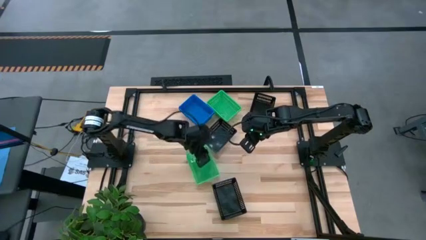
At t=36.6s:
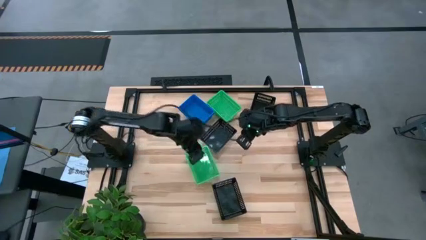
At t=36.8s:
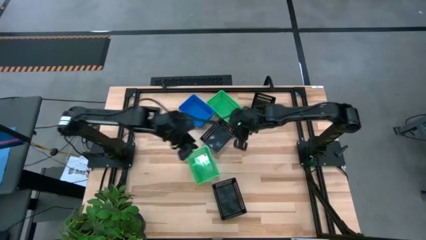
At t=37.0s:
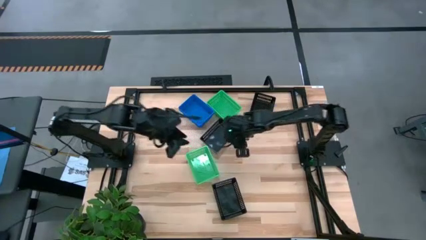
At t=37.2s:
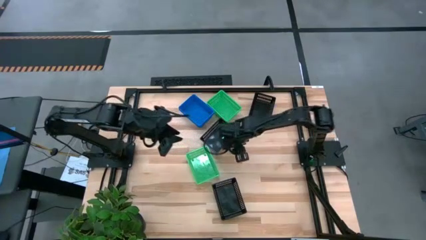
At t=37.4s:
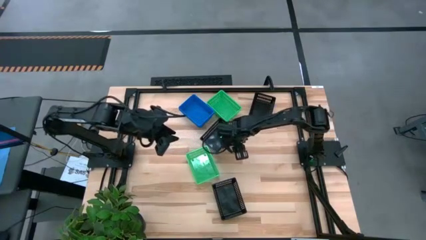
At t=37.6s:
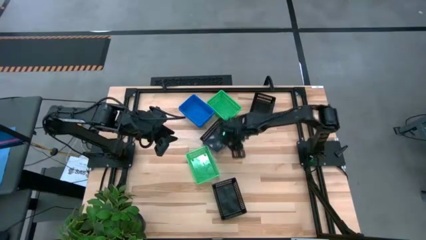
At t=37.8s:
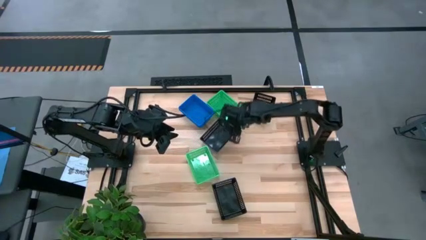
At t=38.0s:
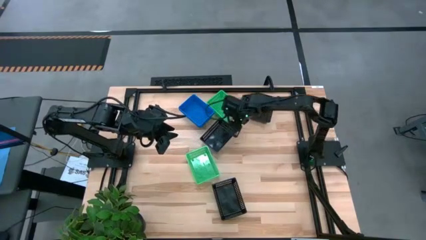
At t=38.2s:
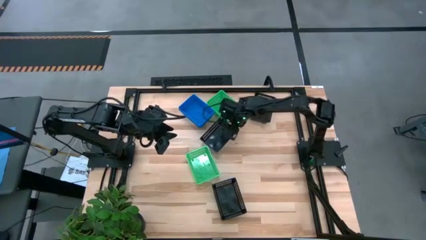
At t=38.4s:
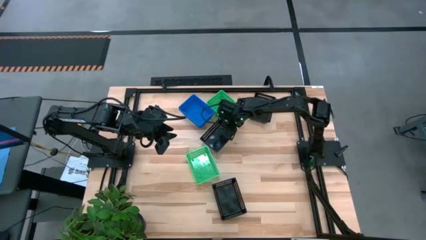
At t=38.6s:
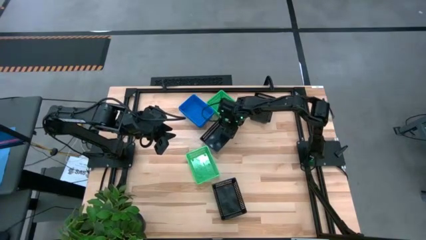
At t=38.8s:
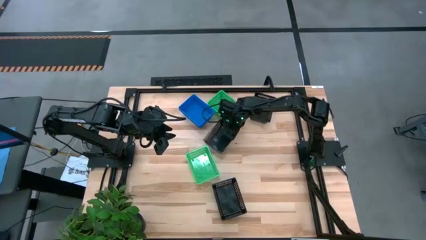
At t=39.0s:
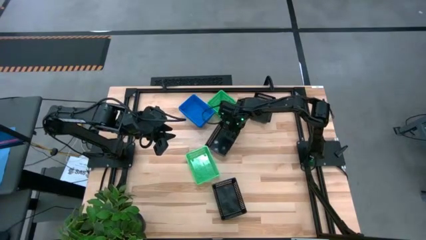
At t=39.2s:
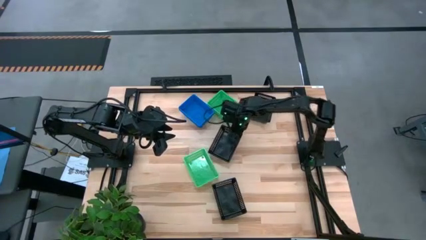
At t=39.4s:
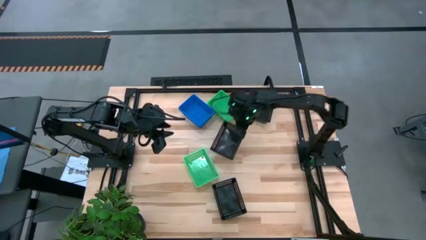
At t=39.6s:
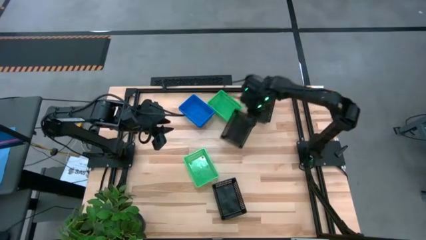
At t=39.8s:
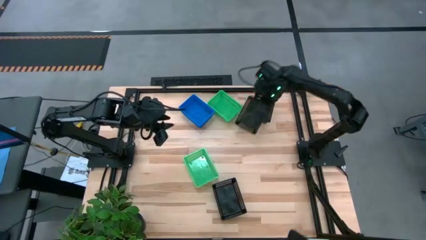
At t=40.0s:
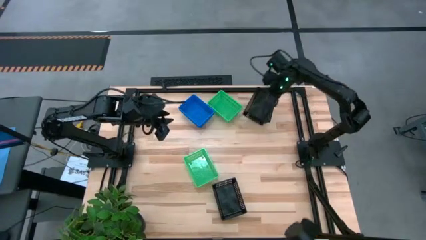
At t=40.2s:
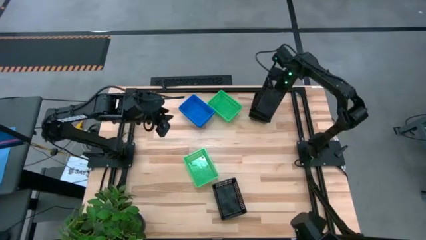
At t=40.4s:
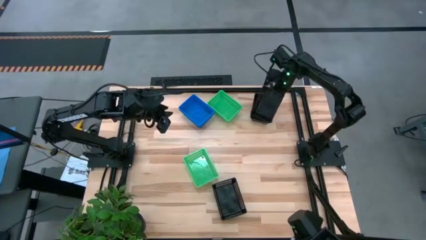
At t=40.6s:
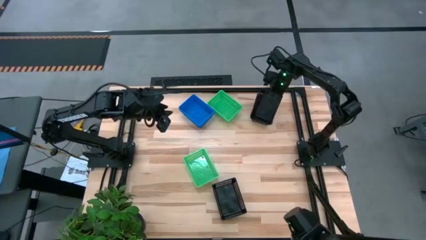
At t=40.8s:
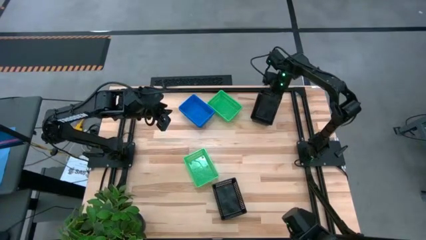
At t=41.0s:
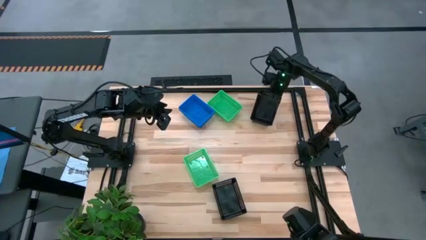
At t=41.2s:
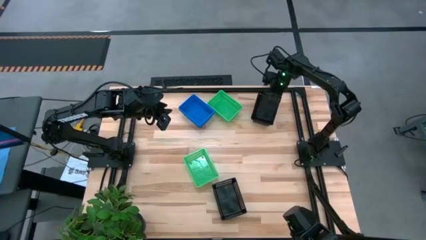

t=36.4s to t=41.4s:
Stack the top black bin on the black bin

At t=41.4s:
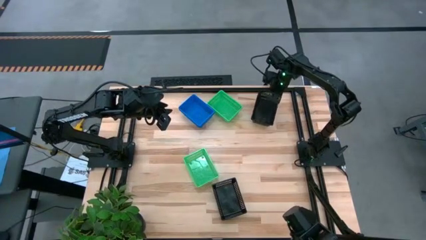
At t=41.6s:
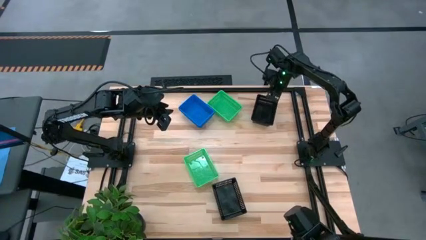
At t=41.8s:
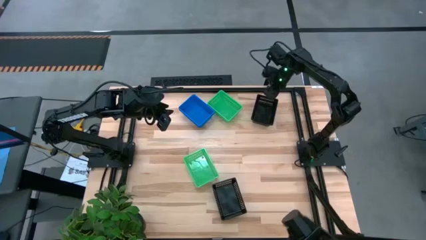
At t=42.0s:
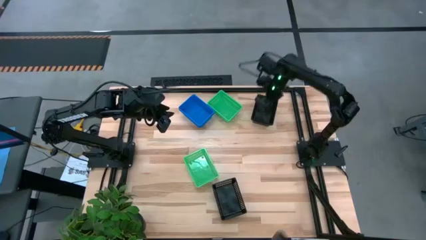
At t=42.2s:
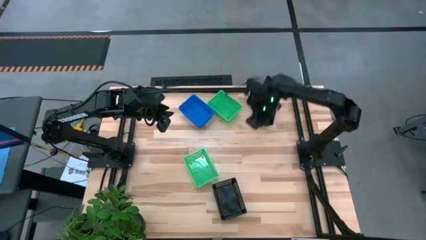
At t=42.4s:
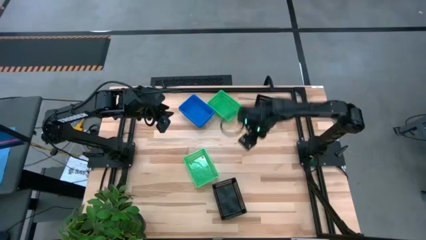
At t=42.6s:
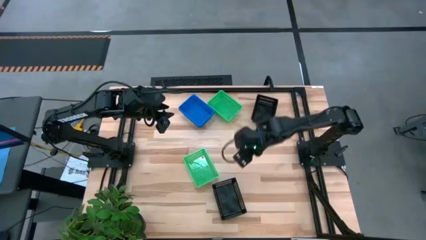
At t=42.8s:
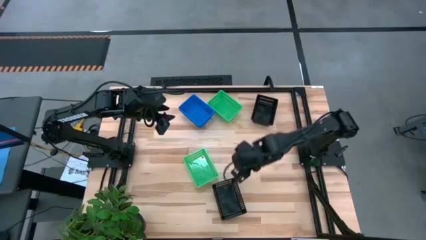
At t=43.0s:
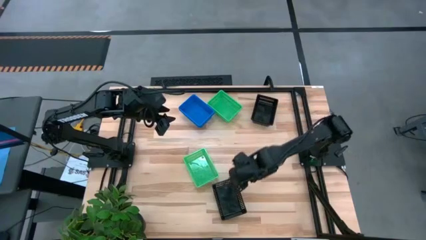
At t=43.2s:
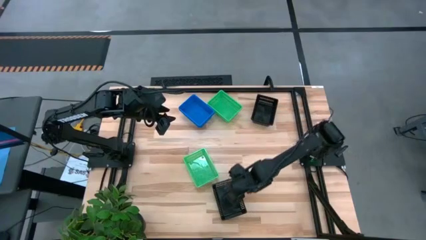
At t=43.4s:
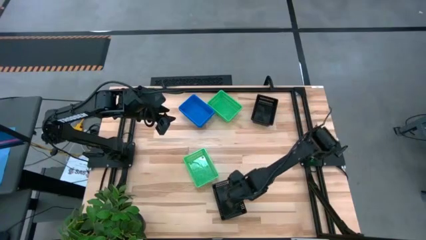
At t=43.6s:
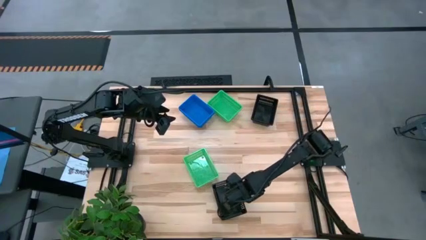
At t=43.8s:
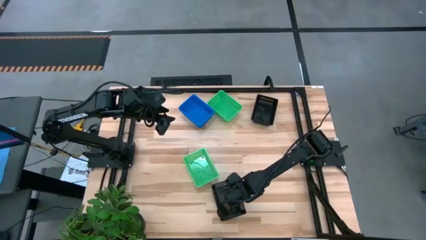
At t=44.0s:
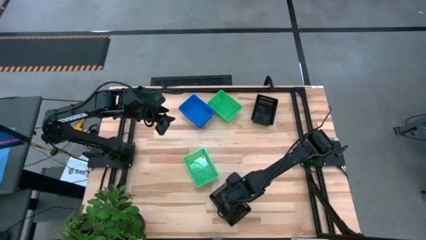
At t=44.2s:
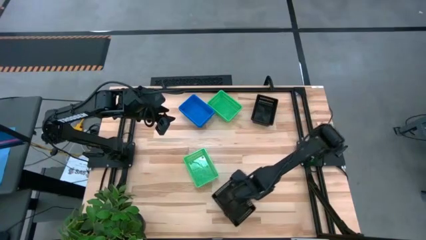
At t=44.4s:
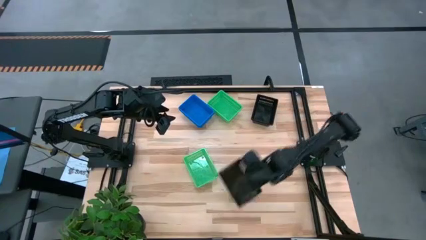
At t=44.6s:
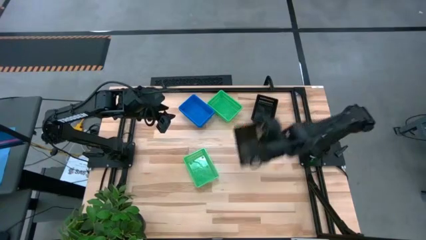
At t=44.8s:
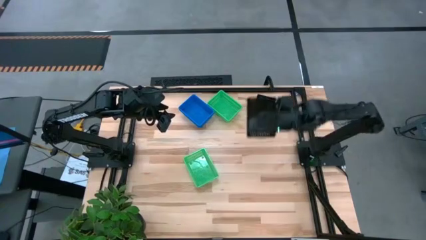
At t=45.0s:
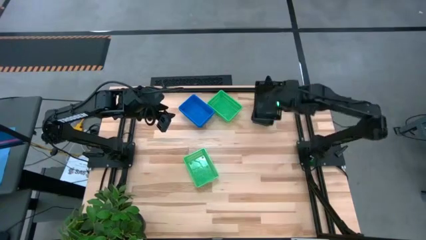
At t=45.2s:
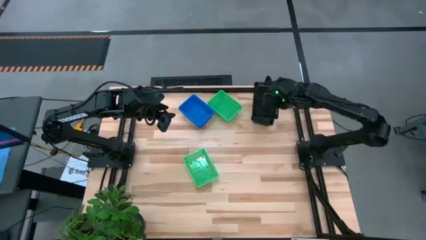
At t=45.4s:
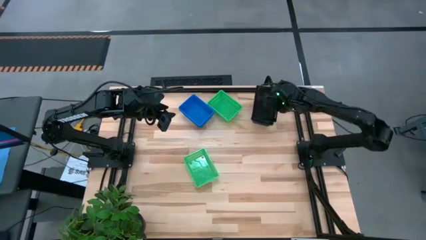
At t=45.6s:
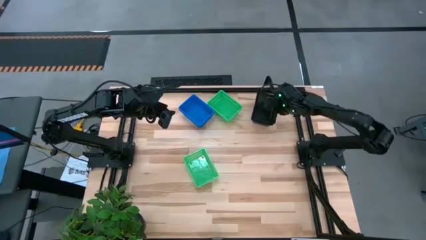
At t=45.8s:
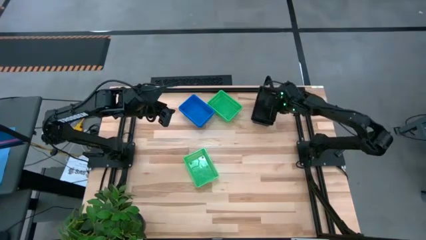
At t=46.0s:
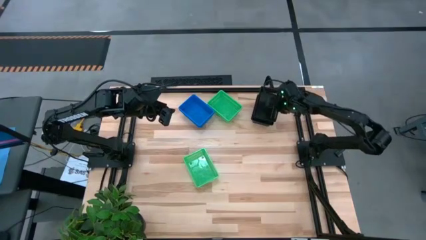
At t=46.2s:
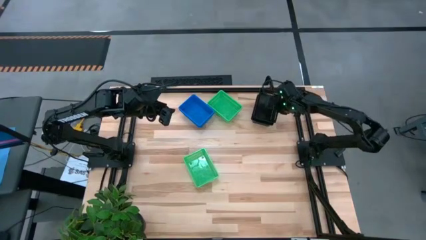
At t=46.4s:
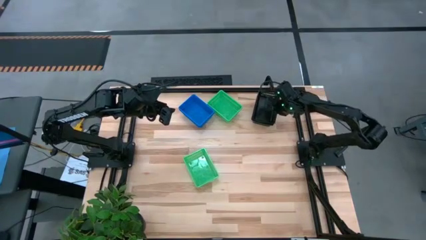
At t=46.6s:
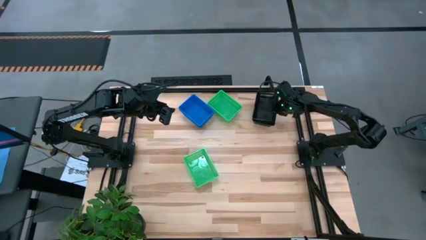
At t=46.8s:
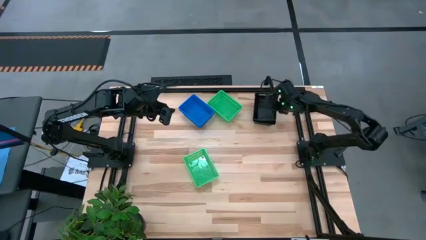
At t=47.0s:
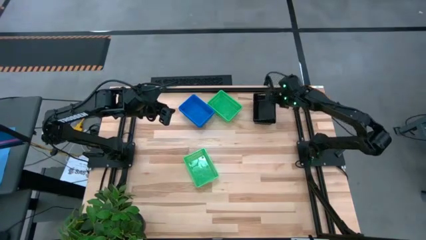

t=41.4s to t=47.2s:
Stack the bottom black bin on the black bins
